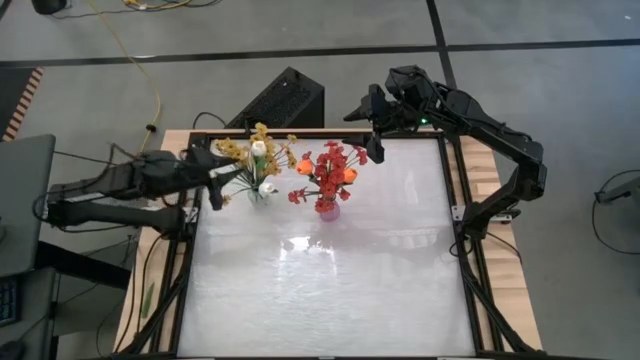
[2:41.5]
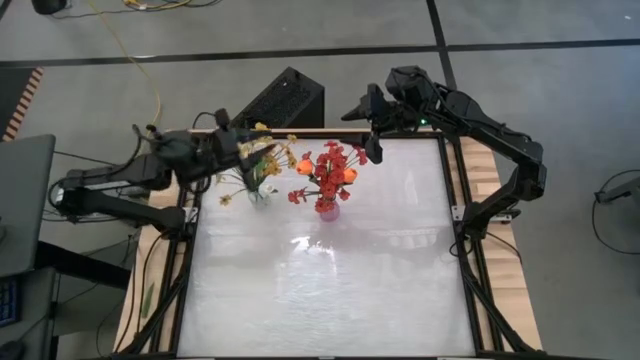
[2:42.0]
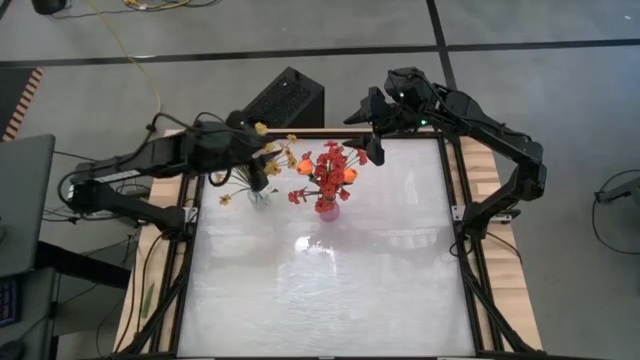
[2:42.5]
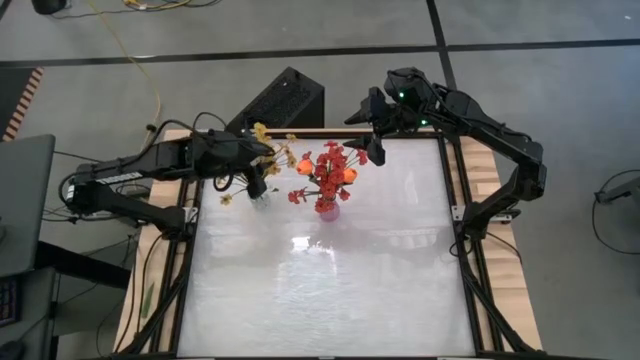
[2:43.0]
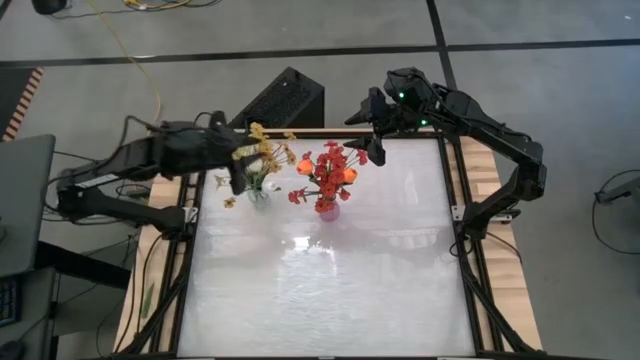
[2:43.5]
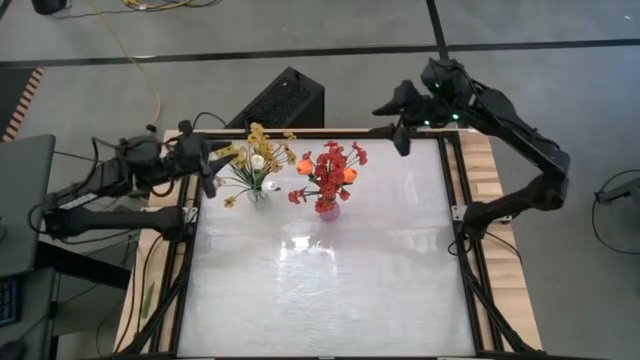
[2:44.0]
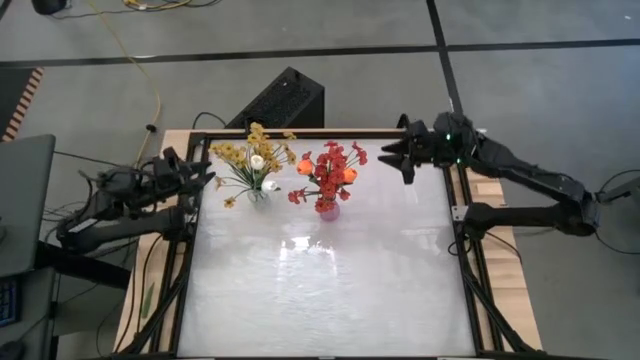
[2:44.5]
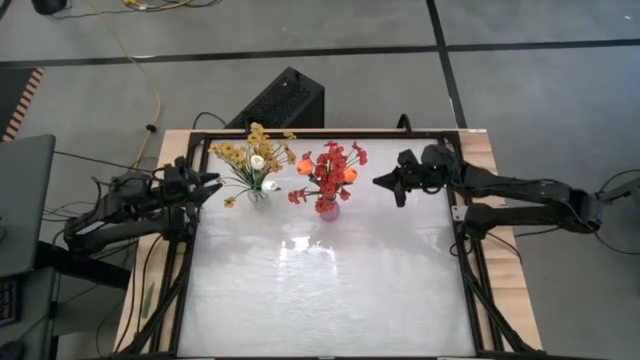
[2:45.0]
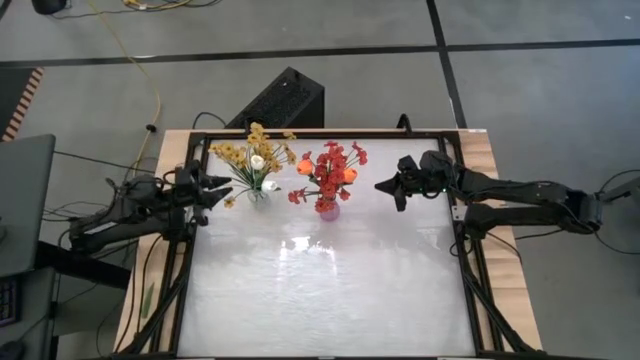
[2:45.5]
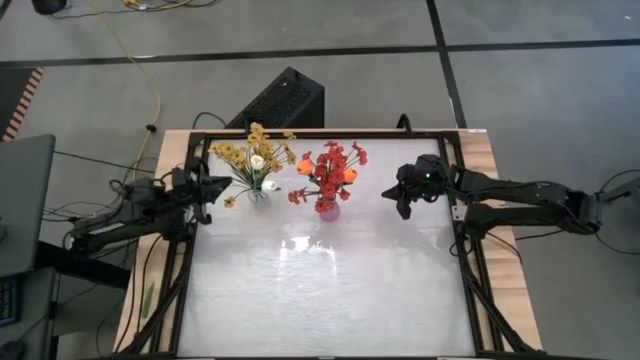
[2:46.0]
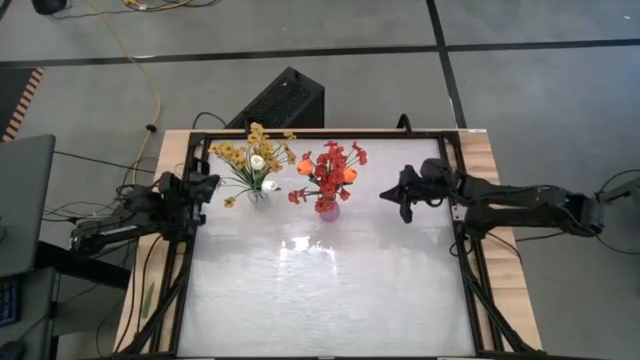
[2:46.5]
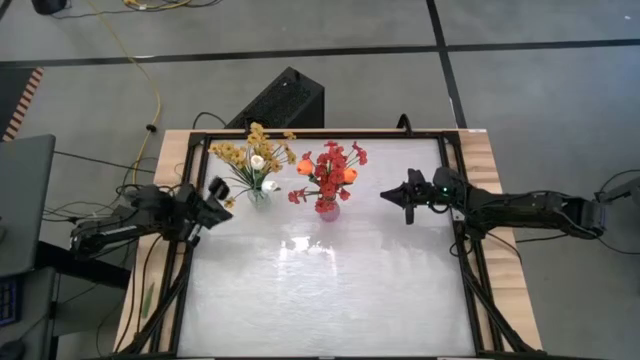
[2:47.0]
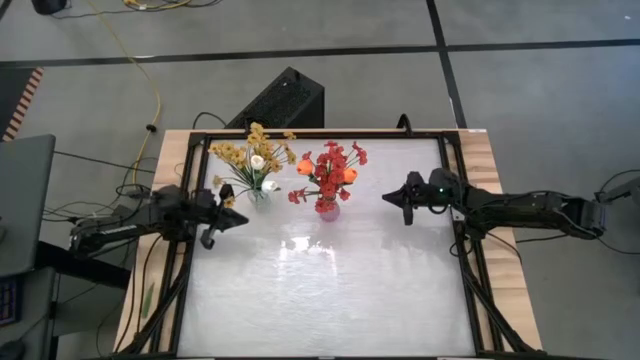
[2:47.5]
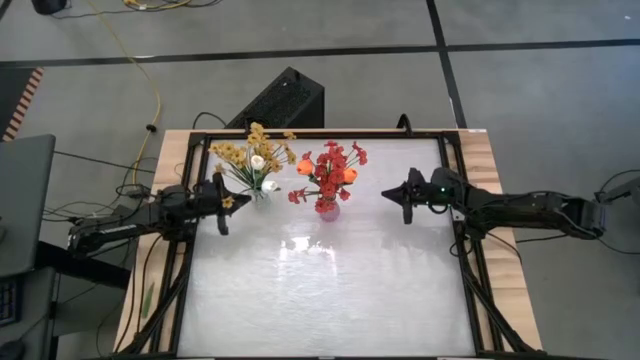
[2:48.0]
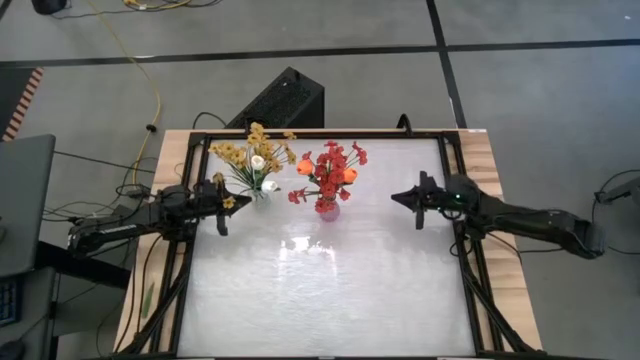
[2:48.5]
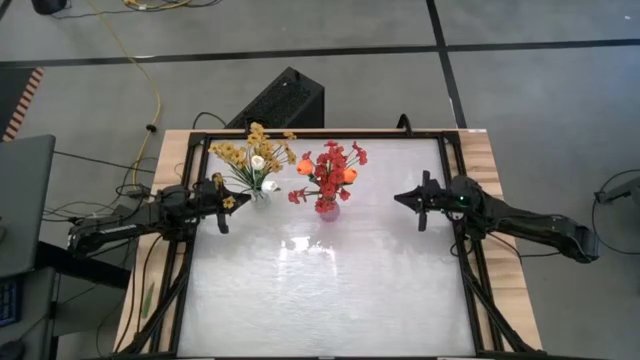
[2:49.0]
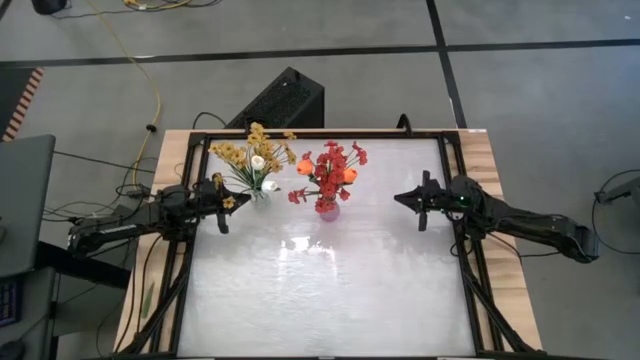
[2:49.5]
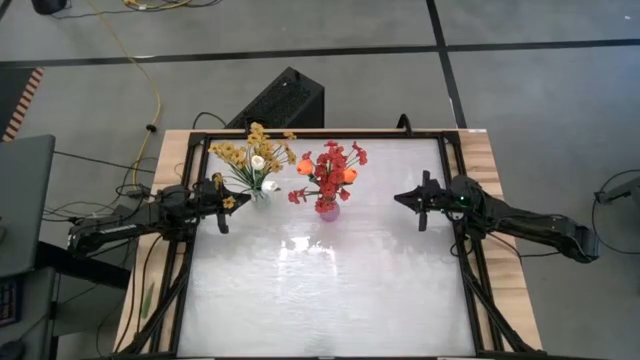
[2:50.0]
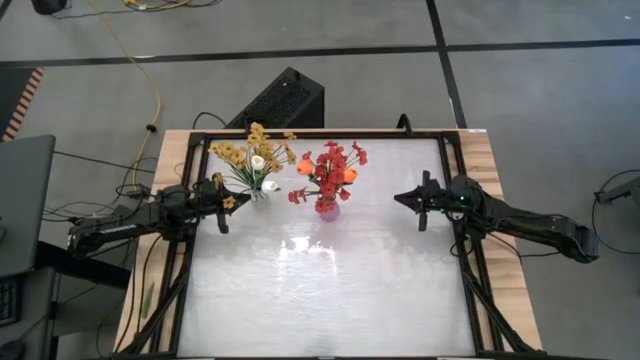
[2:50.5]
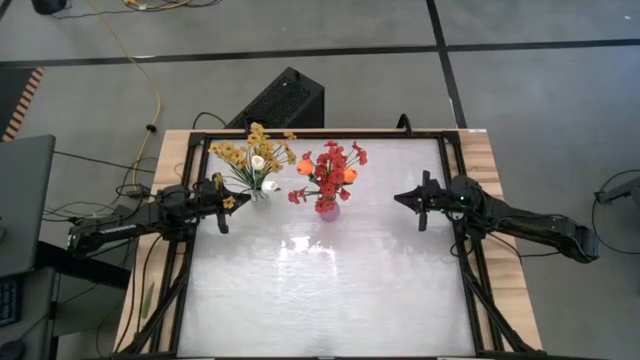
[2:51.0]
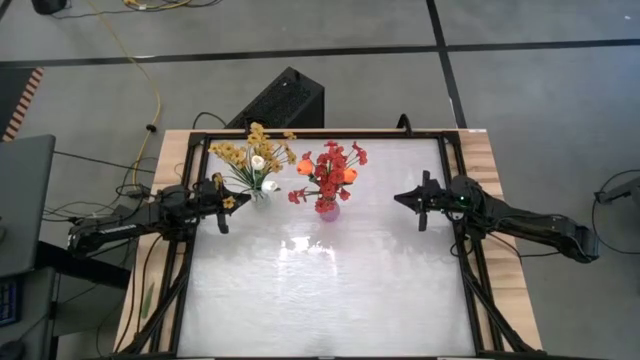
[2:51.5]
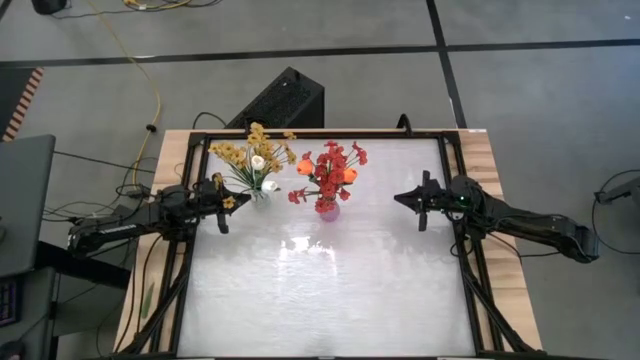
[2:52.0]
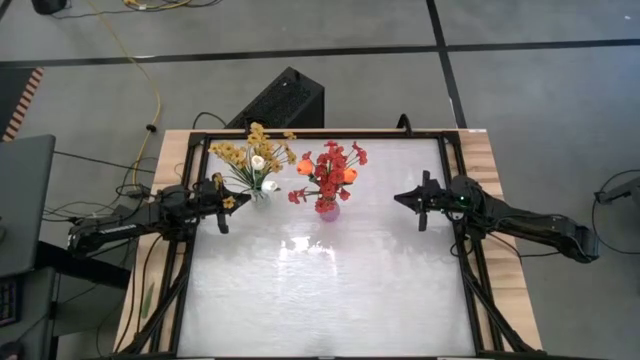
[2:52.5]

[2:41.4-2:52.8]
Task: Sort flowers into vase by color
Return to Home Position

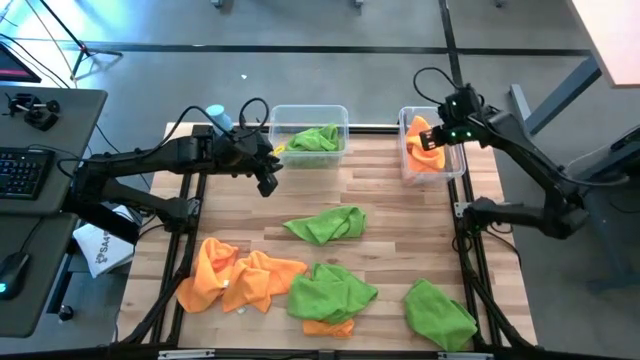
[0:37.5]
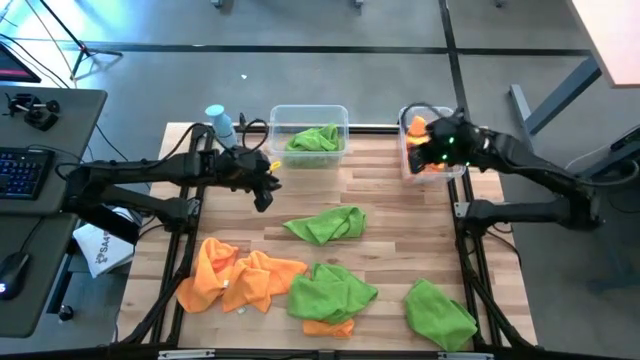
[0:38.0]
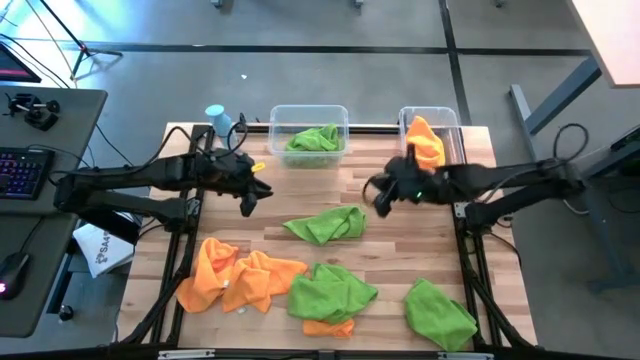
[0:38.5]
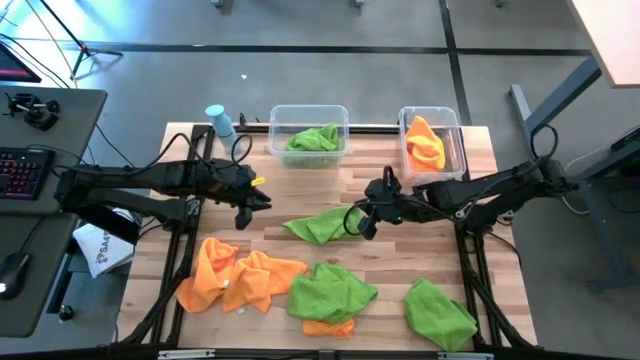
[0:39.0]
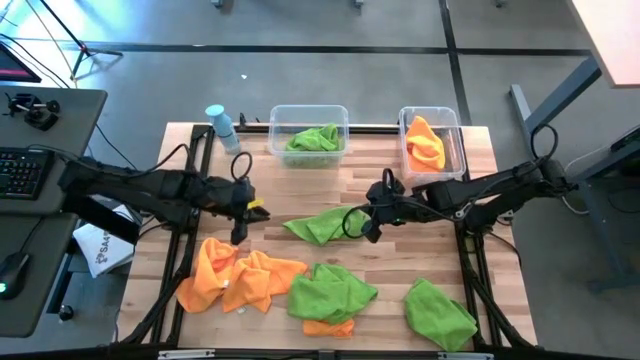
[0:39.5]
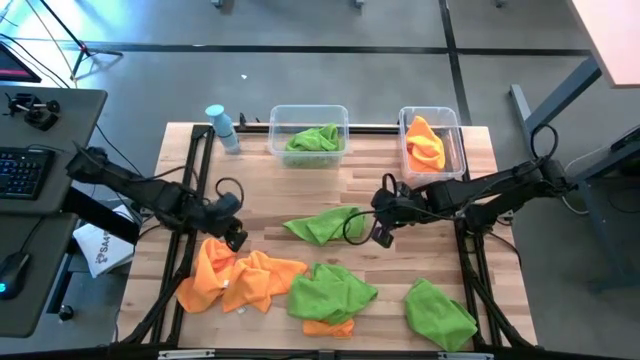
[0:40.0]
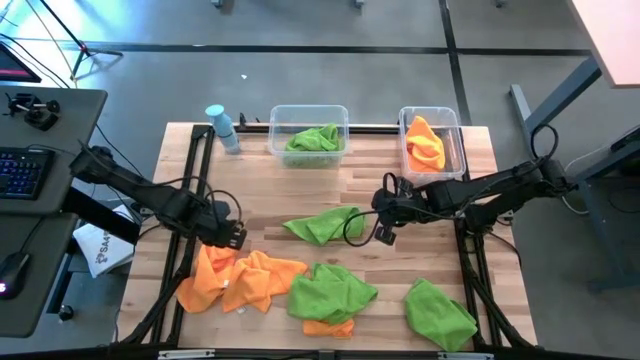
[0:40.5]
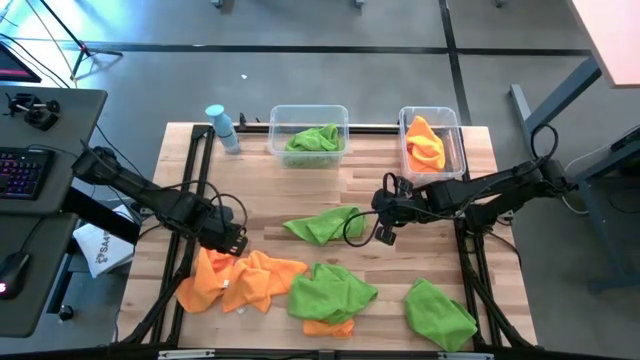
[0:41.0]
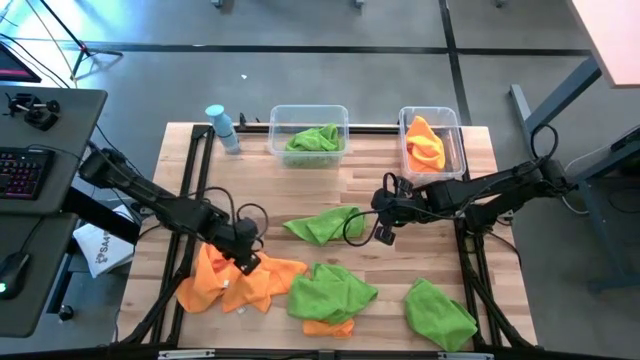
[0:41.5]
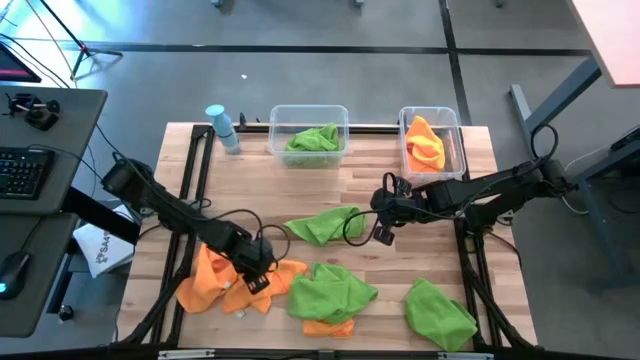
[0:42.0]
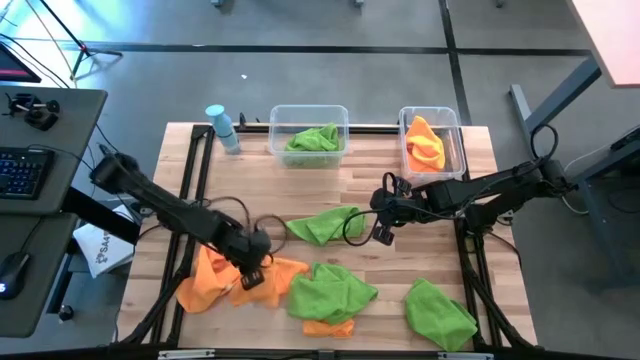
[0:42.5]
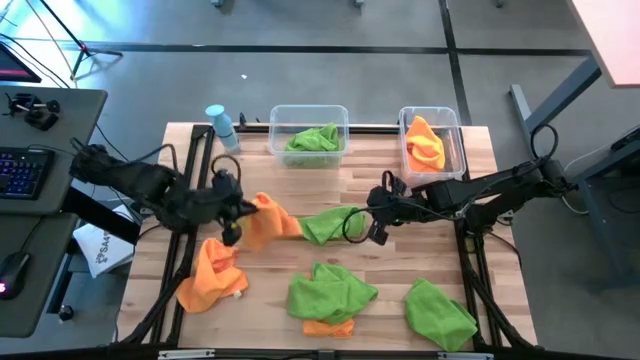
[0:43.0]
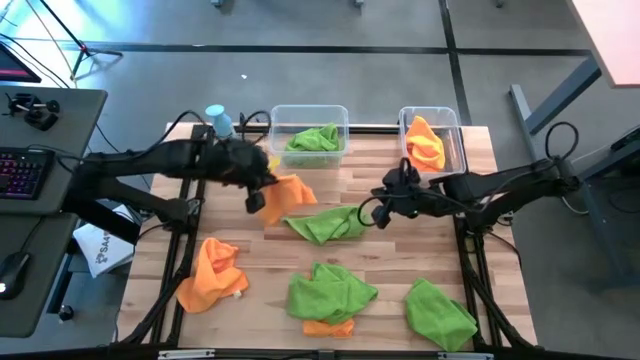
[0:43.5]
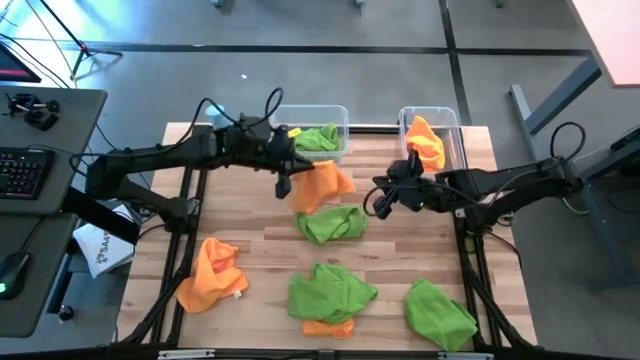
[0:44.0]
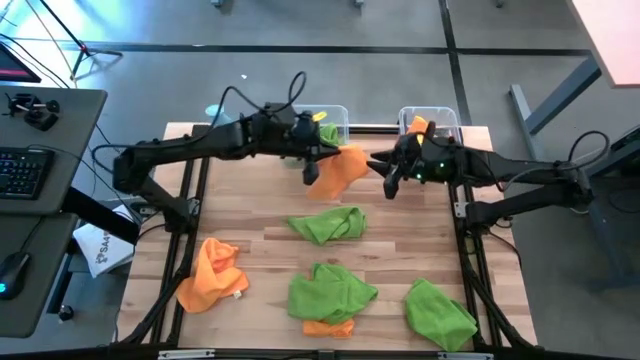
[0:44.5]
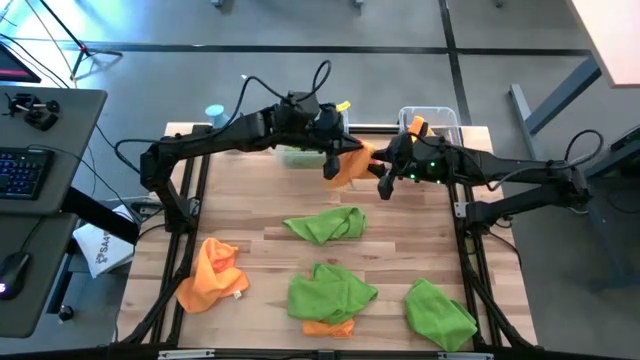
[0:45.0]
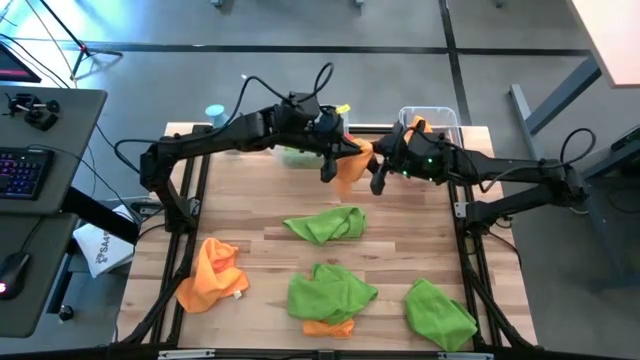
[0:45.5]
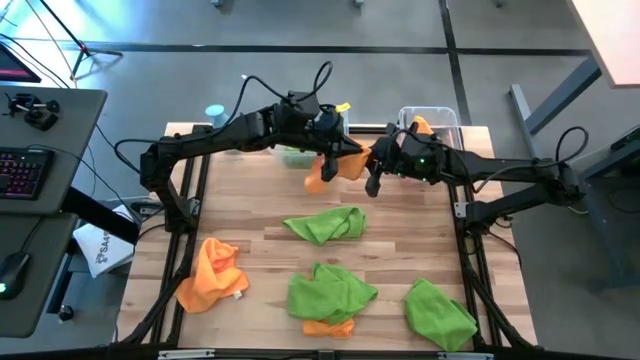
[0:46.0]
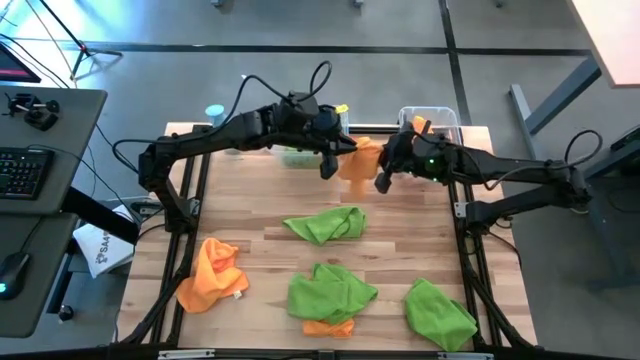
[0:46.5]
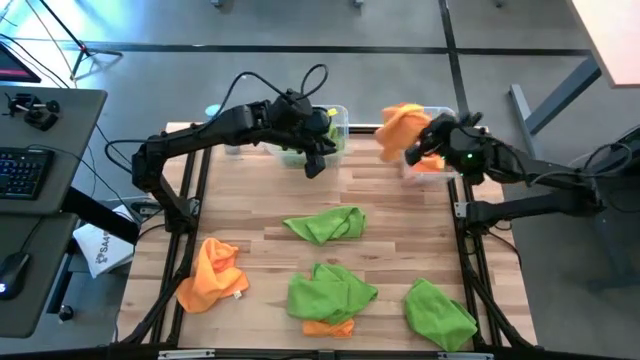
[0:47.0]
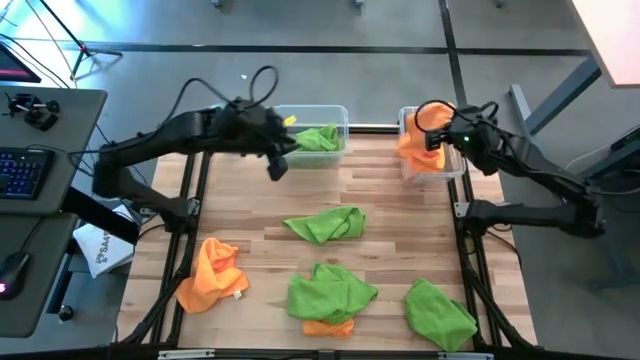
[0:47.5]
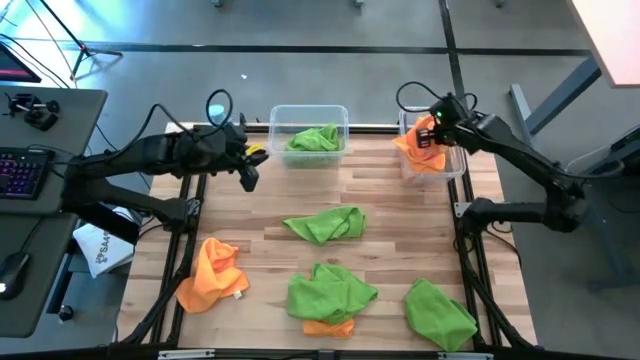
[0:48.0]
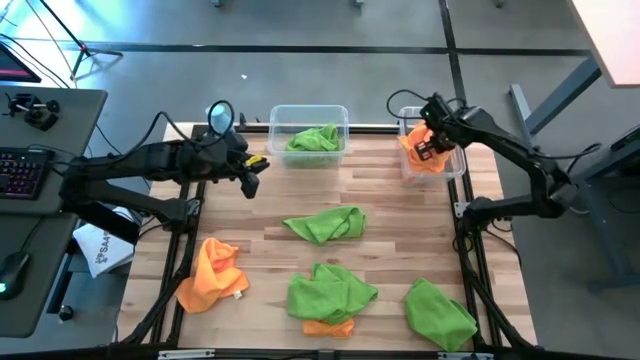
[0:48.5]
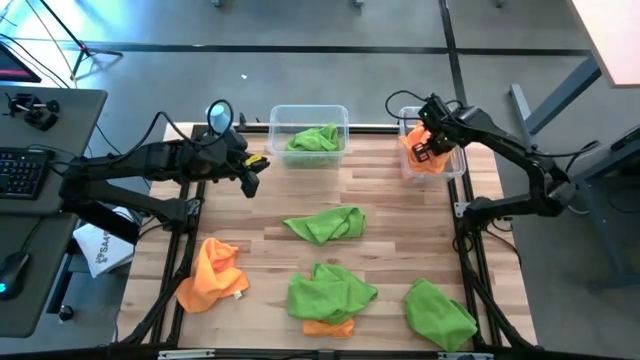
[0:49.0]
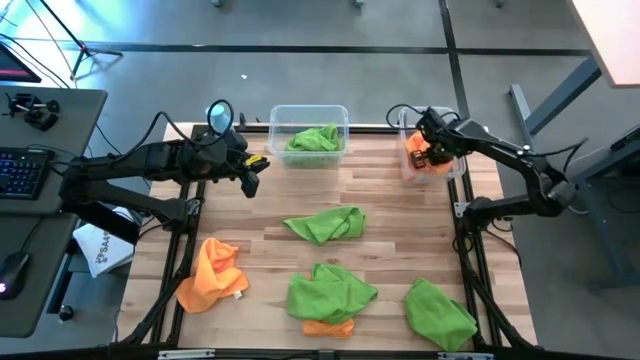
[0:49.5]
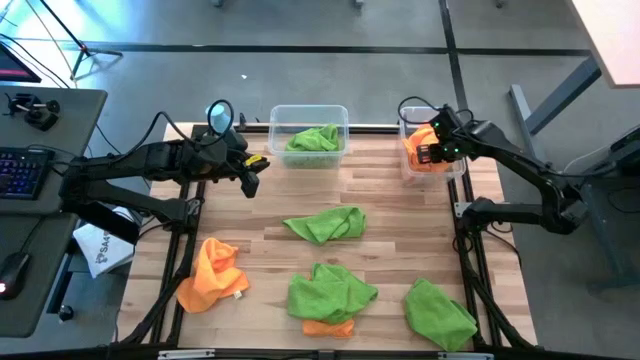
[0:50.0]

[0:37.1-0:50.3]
Task: Sort microfiber towel by color & place in baskets
Put the orange towel into the right transparent bin
